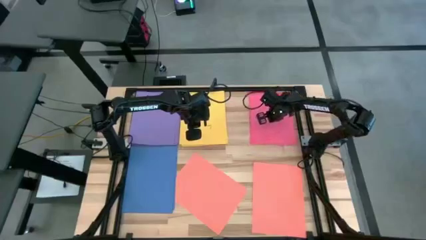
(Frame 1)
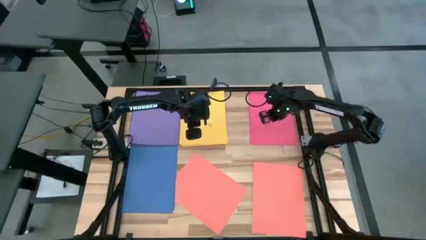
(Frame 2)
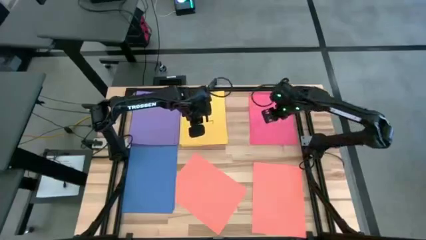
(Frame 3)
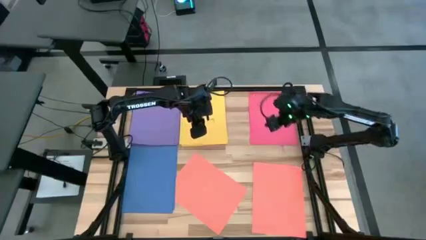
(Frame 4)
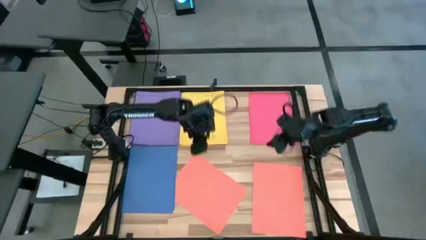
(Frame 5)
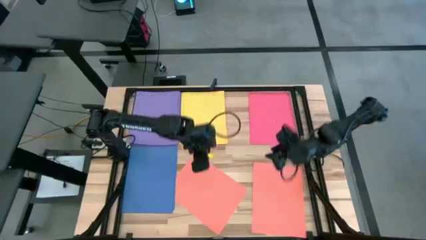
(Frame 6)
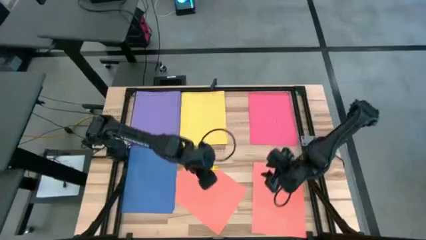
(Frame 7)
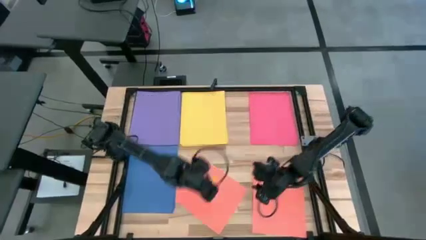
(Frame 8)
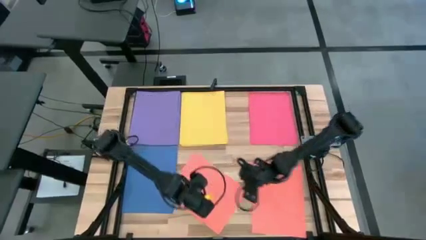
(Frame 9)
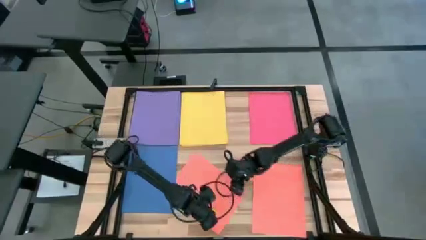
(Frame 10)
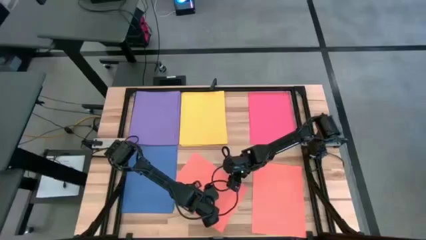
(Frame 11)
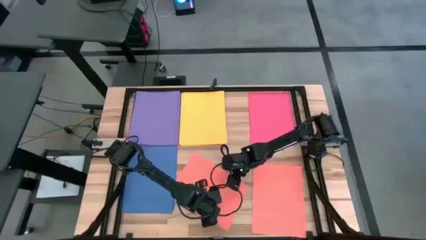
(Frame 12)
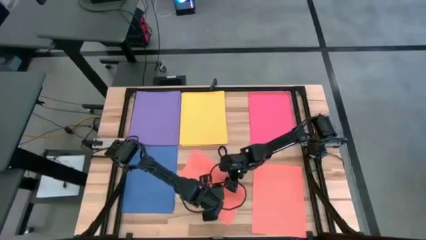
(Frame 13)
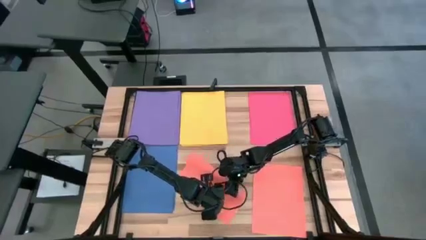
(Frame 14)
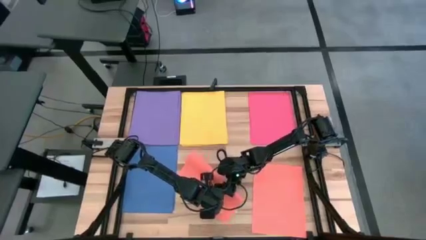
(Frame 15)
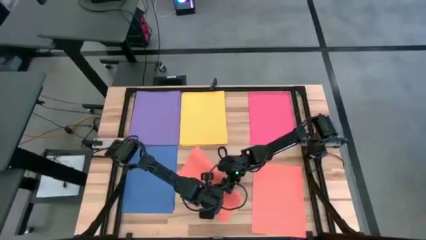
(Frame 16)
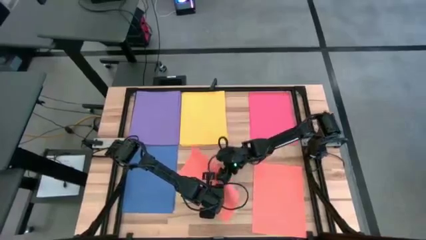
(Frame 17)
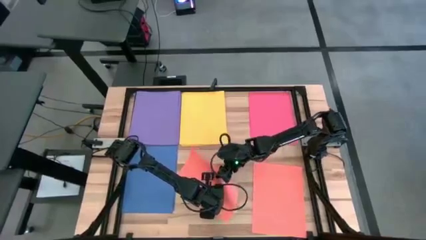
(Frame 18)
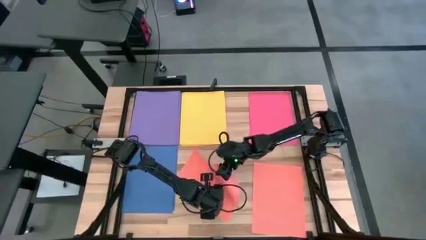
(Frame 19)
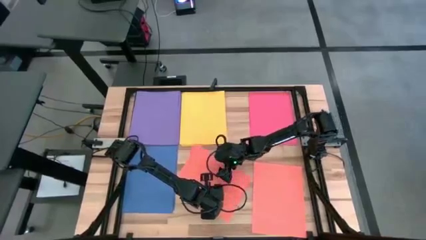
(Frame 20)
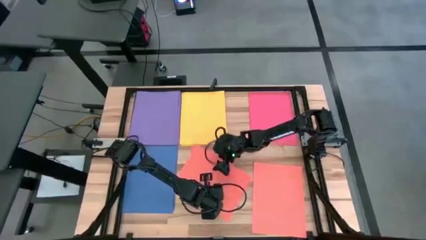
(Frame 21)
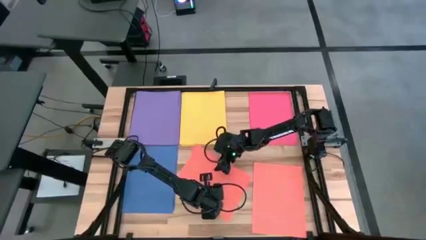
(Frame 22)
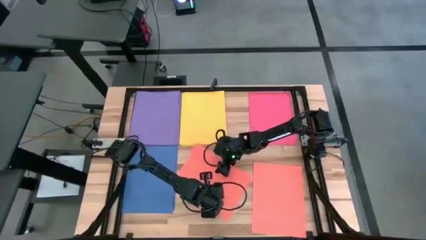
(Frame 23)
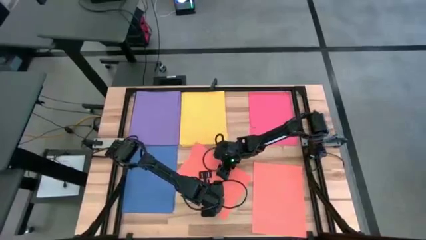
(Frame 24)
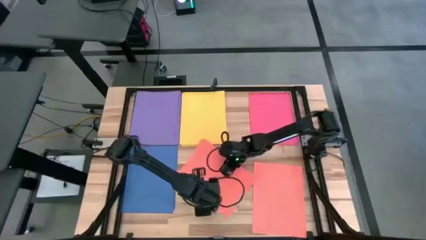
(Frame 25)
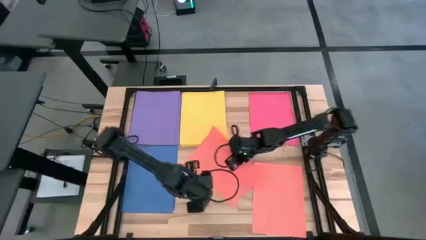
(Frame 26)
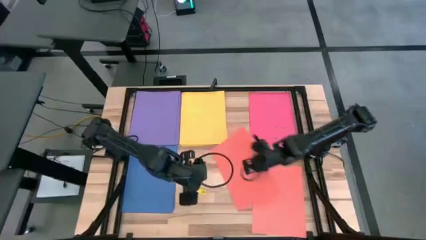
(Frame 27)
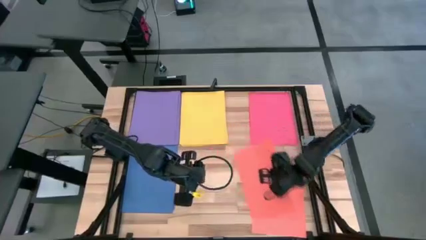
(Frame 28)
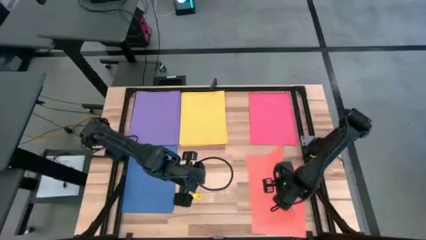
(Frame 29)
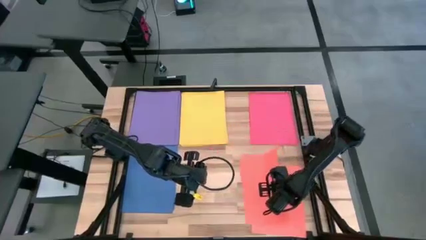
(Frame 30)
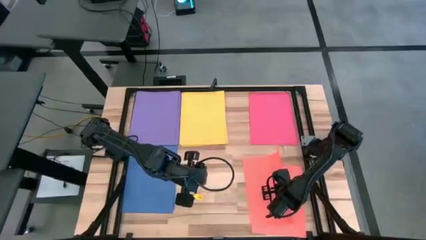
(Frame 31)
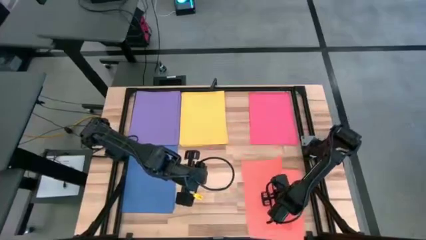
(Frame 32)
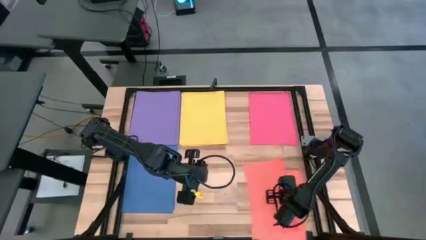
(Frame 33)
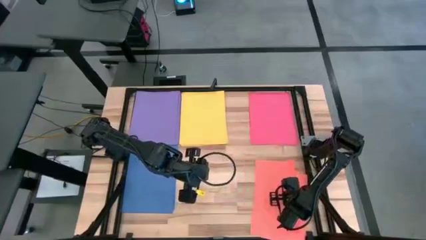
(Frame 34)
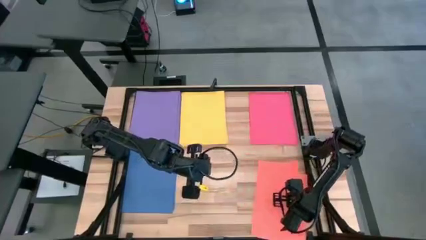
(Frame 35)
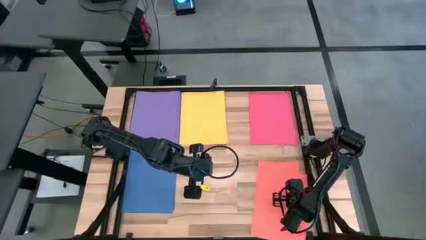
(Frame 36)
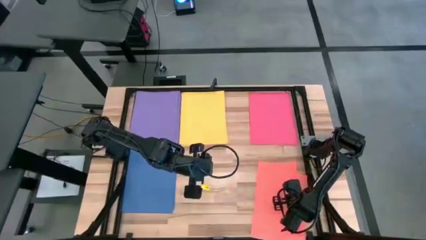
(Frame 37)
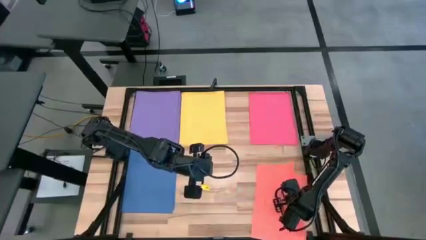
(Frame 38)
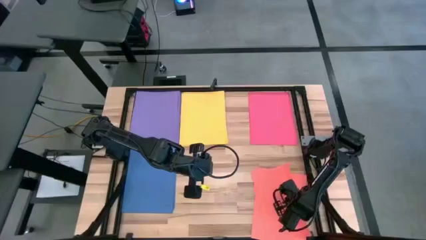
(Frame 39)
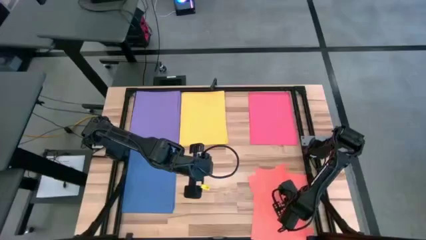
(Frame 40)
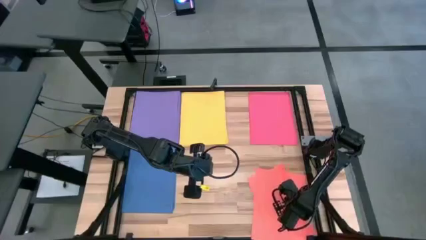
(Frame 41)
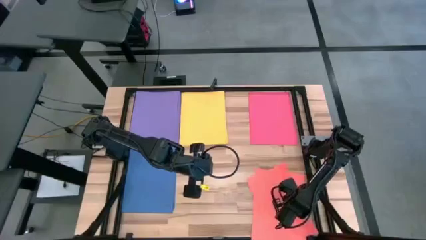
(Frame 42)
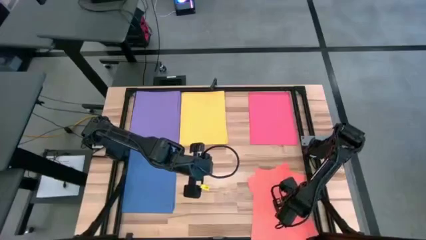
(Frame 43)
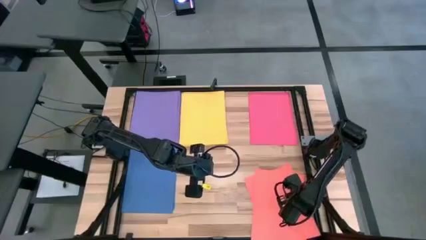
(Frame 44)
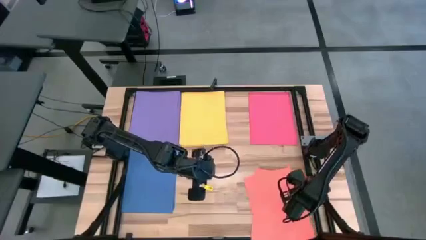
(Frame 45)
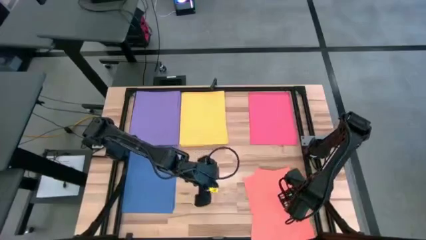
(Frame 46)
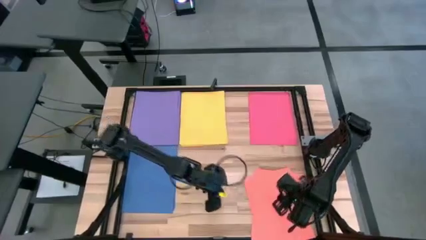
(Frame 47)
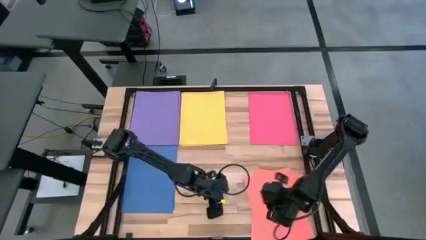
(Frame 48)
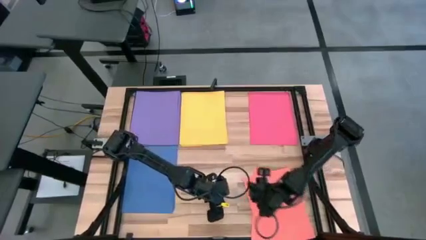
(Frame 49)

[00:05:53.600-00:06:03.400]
Task: Organize paper
Stack the orange paper on top of the orange paper

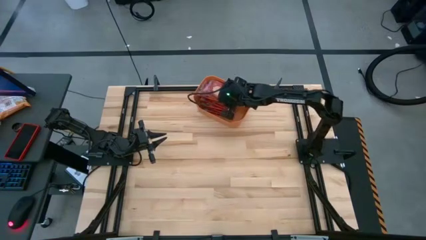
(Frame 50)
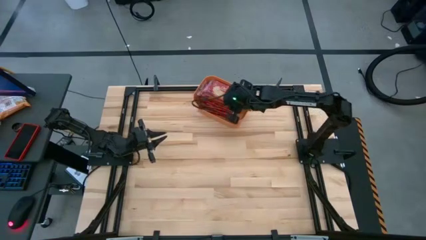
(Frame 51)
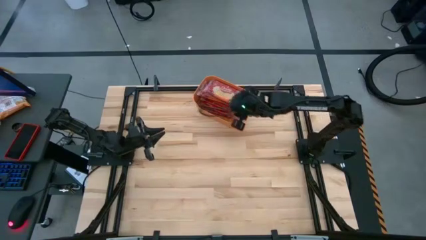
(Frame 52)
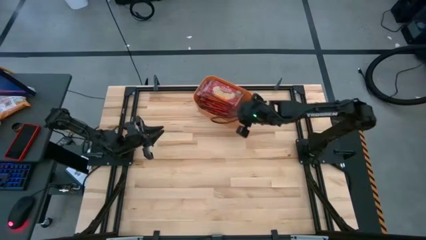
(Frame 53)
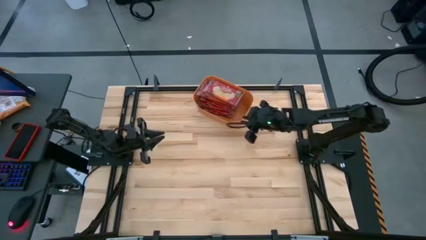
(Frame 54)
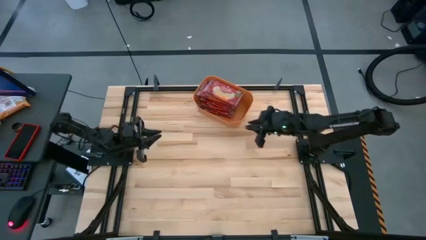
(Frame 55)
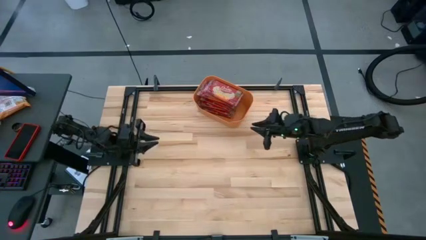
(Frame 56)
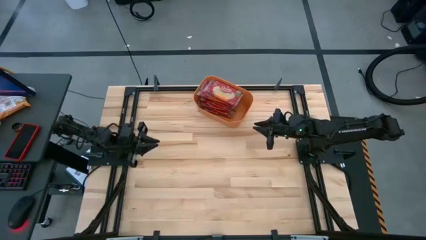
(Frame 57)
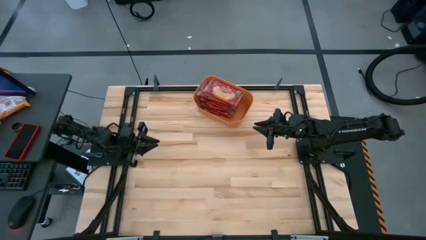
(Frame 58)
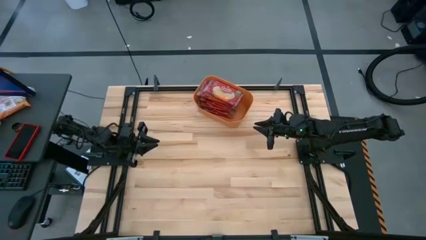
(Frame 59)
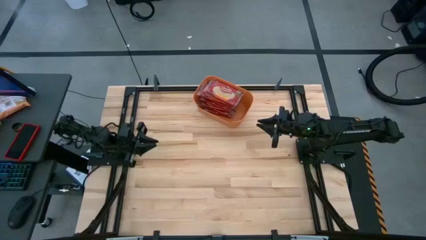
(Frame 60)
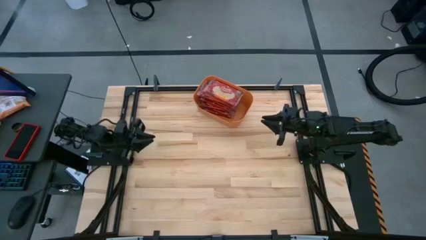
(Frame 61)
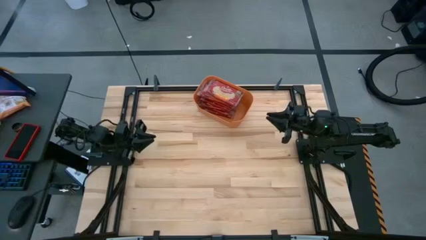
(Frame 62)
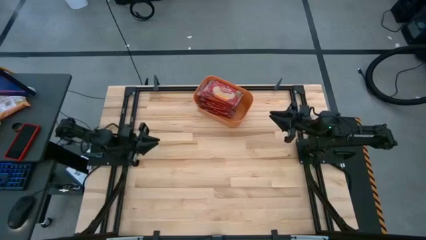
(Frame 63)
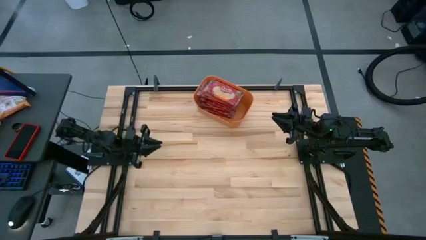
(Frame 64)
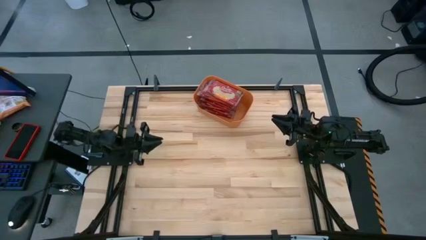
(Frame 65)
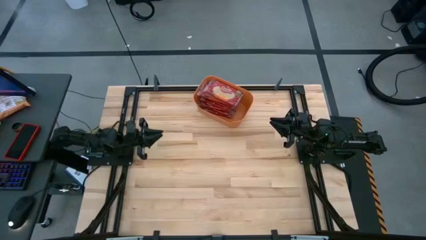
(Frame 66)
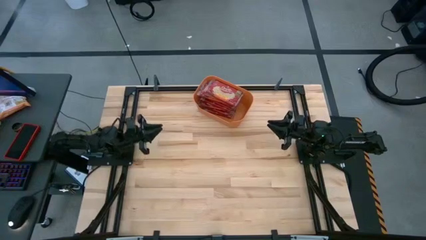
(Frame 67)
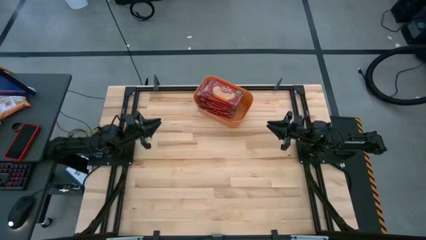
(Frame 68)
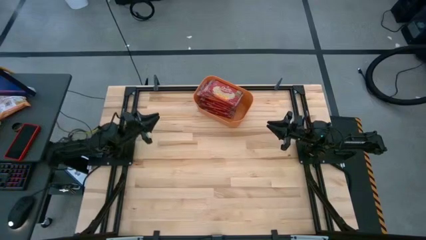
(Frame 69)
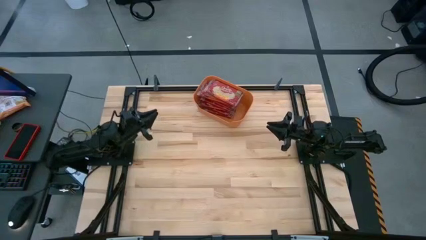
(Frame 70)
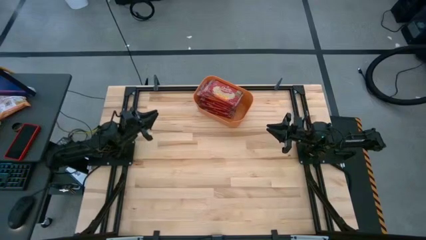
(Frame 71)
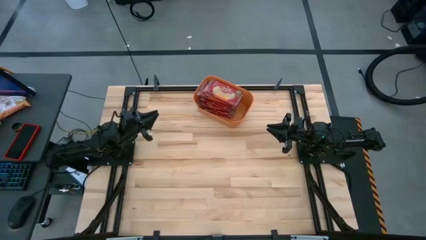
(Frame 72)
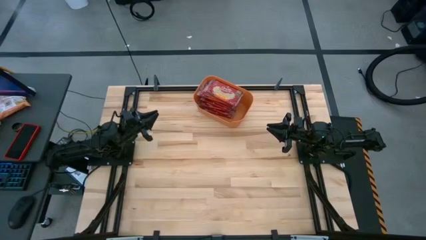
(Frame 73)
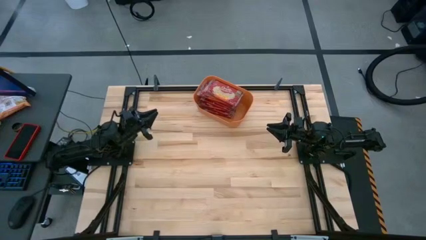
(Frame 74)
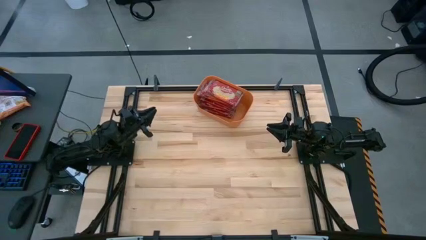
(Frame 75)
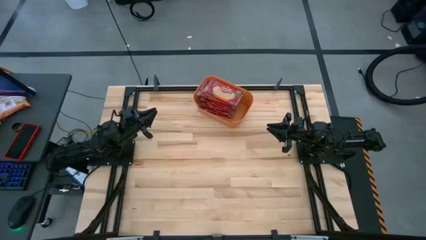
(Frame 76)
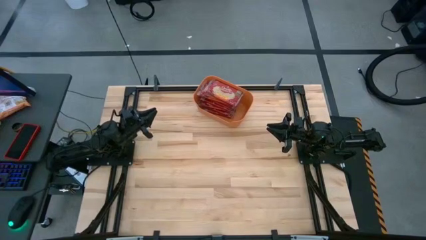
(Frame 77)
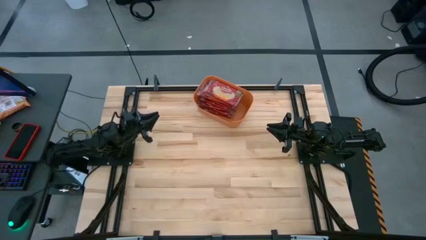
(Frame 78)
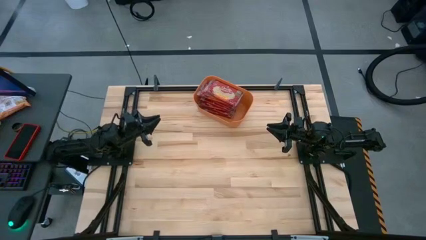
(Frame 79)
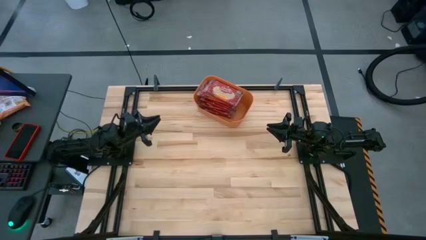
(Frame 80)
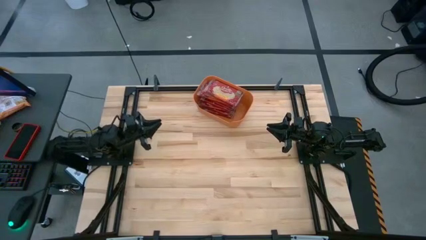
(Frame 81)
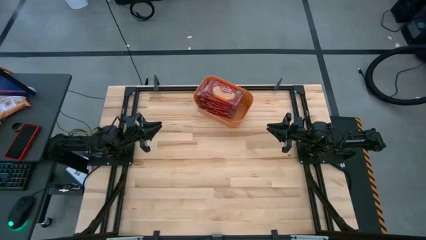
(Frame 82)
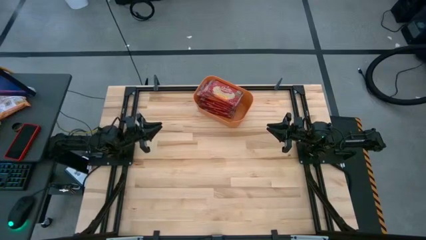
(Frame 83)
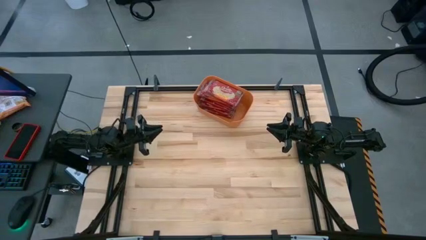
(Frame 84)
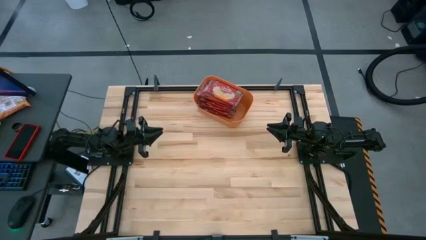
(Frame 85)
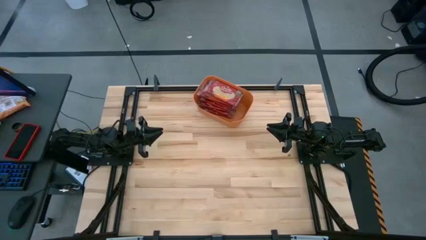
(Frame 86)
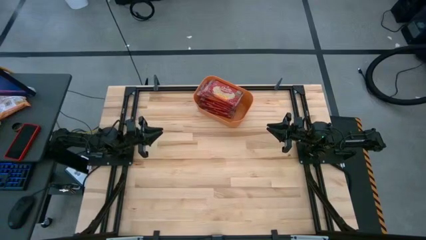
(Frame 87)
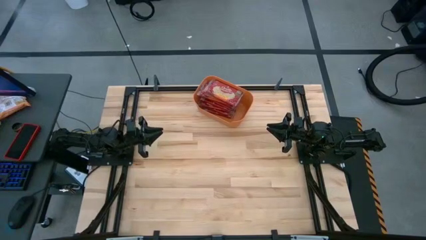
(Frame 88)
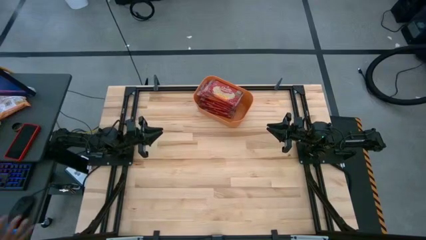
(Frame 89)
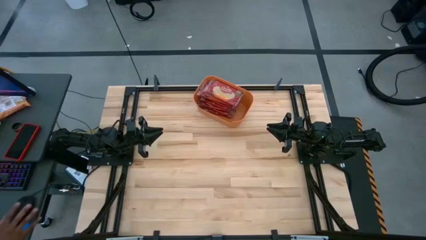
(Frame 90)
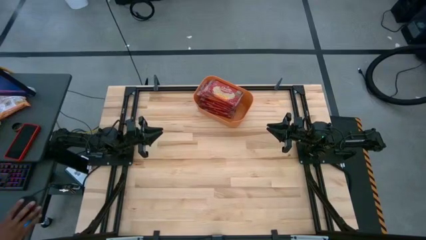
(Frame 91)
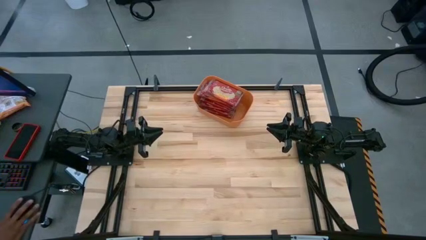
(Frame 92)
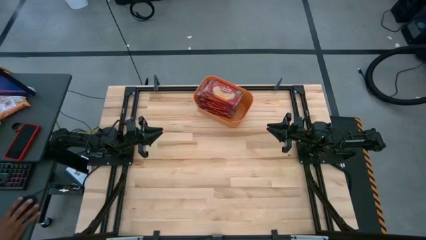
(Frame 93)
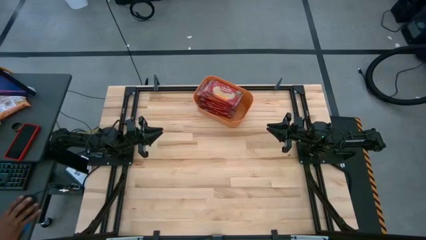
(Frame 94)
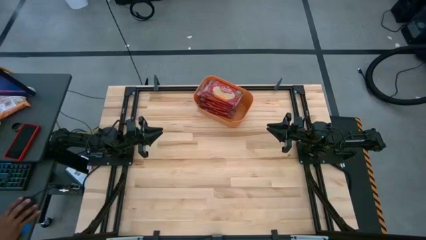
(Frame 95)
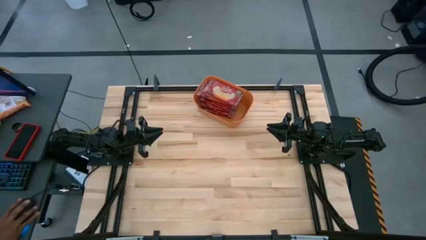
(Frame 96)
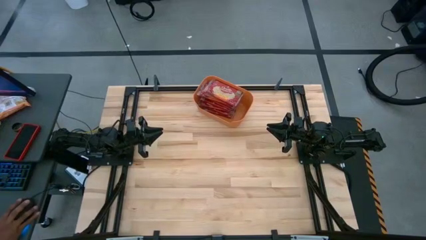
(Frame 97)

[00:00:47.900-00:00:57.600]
Task: Sort popcorn bags into baskets
Return to Home Position
